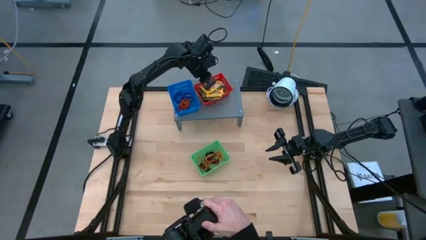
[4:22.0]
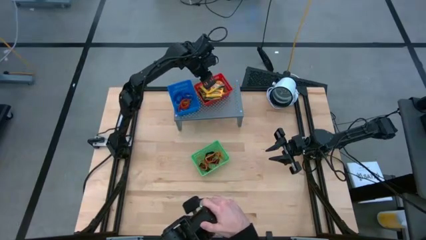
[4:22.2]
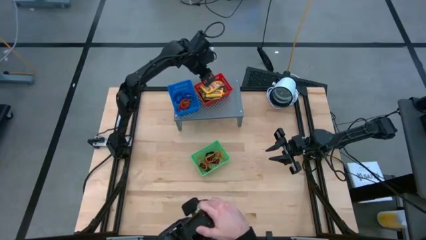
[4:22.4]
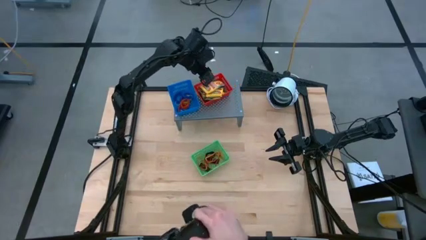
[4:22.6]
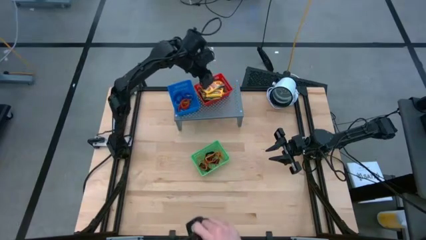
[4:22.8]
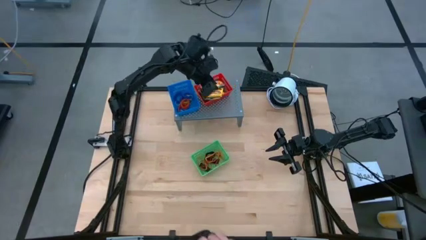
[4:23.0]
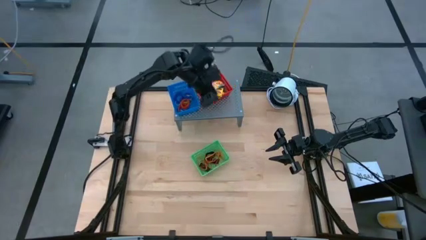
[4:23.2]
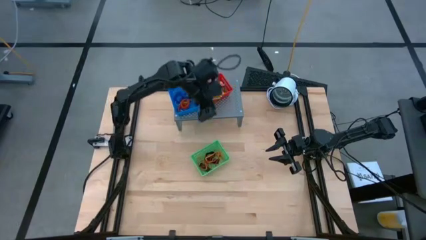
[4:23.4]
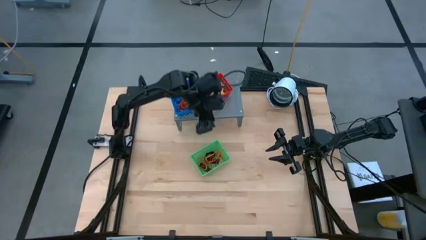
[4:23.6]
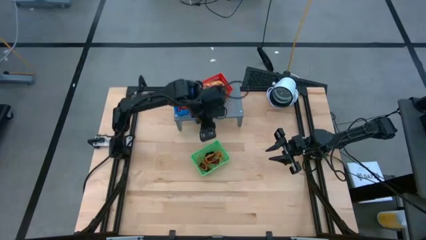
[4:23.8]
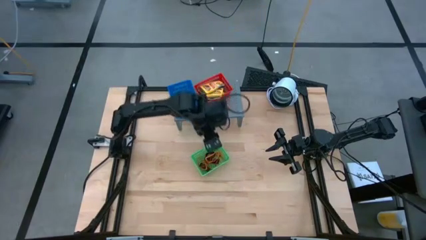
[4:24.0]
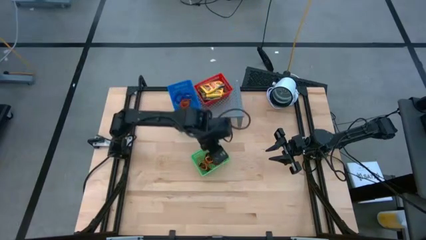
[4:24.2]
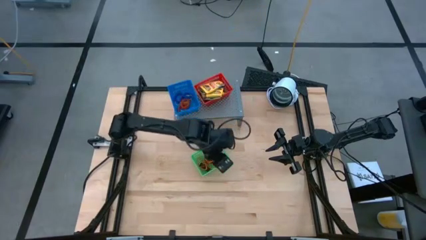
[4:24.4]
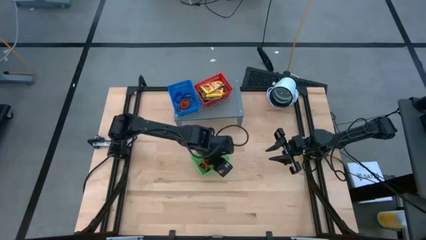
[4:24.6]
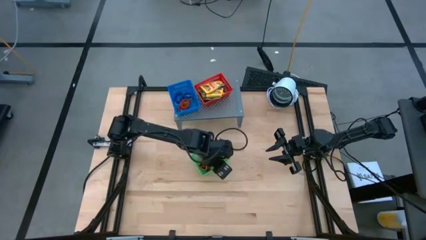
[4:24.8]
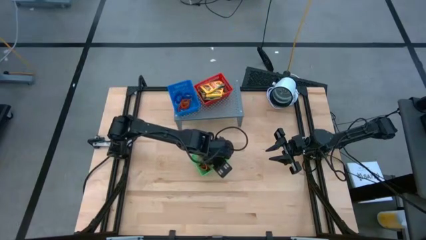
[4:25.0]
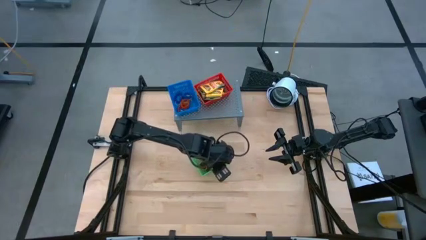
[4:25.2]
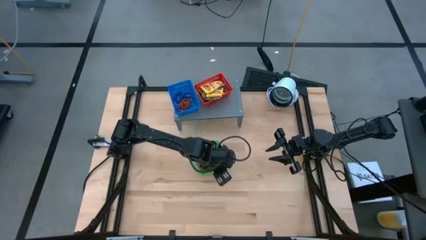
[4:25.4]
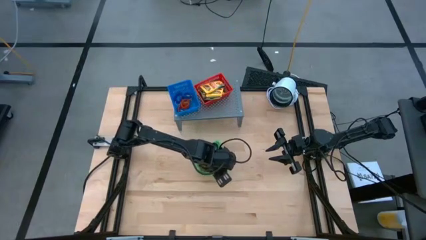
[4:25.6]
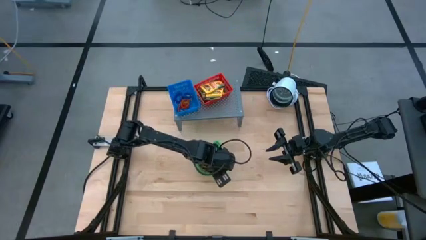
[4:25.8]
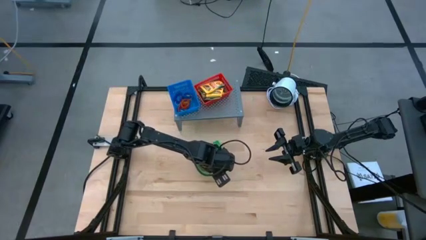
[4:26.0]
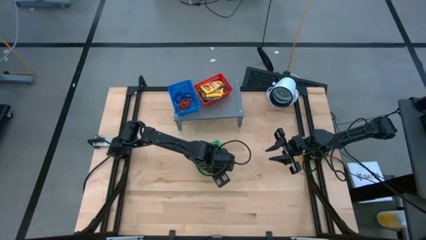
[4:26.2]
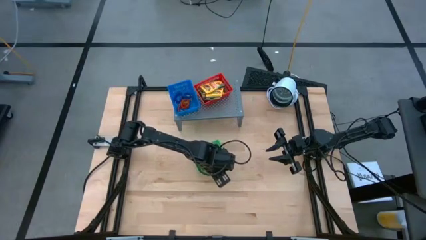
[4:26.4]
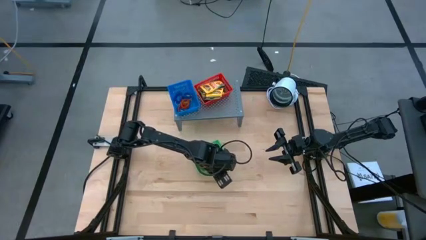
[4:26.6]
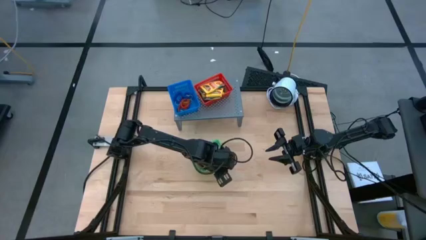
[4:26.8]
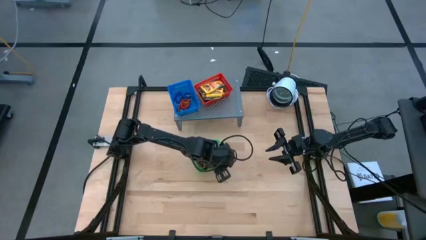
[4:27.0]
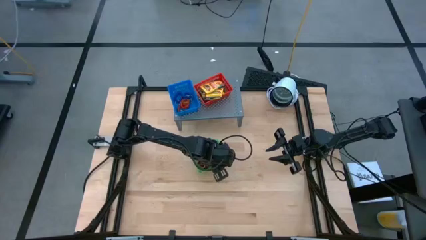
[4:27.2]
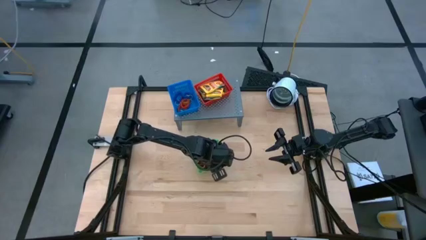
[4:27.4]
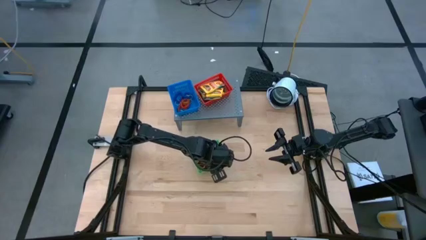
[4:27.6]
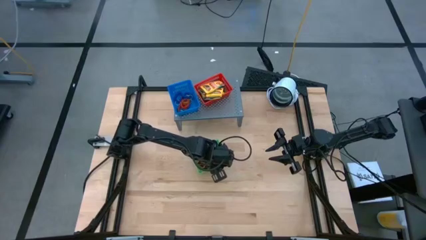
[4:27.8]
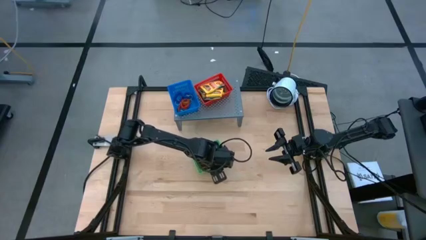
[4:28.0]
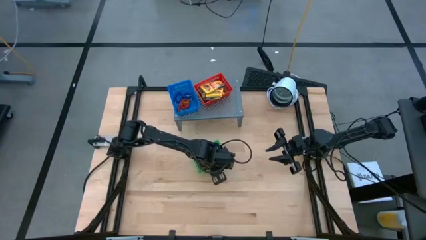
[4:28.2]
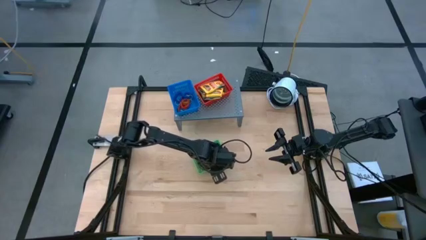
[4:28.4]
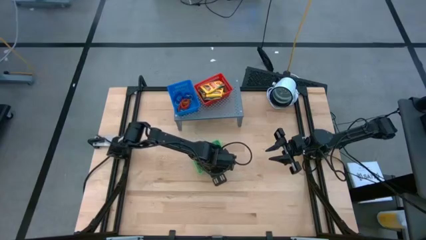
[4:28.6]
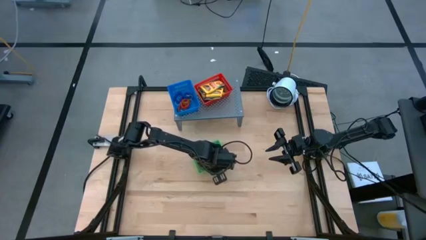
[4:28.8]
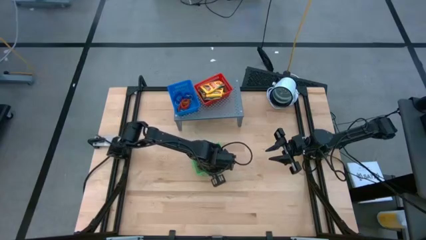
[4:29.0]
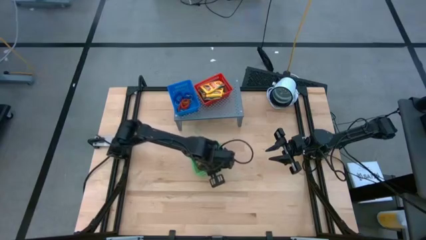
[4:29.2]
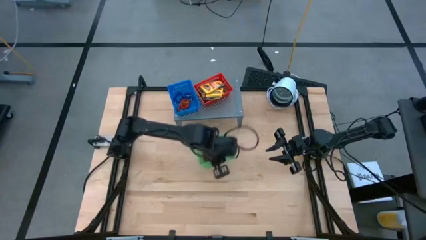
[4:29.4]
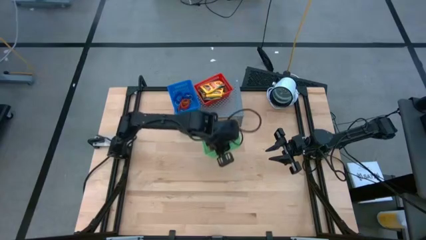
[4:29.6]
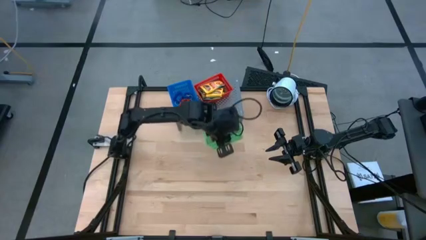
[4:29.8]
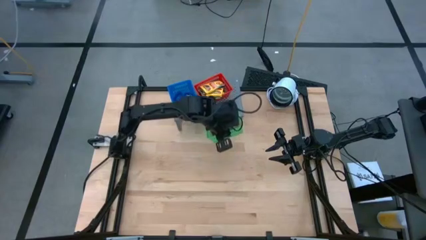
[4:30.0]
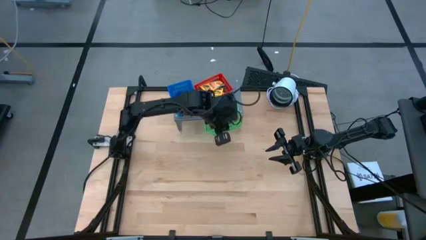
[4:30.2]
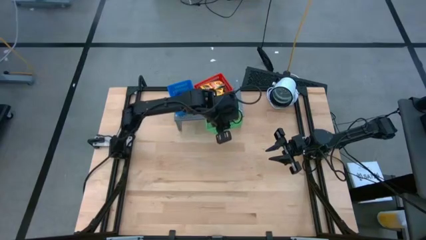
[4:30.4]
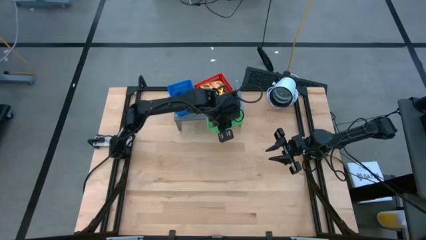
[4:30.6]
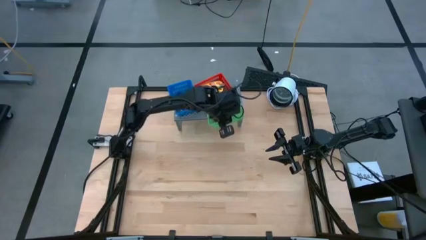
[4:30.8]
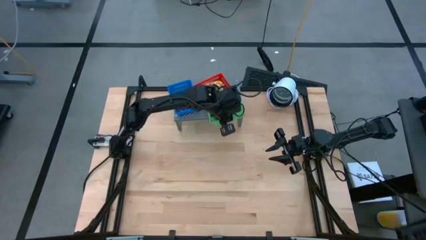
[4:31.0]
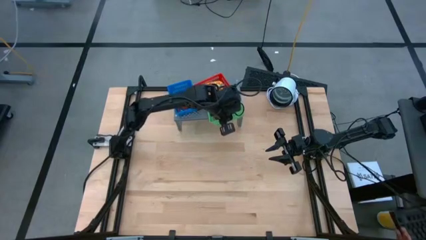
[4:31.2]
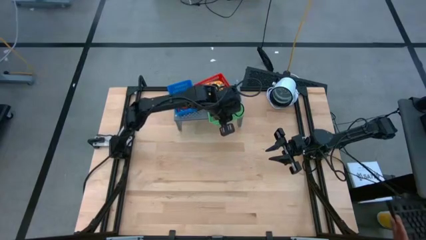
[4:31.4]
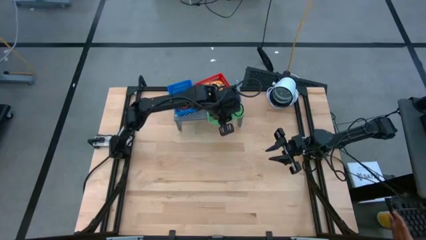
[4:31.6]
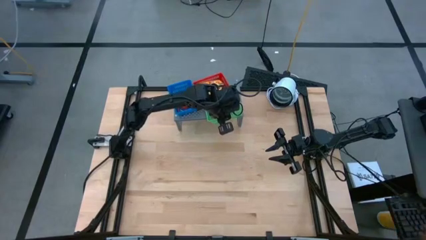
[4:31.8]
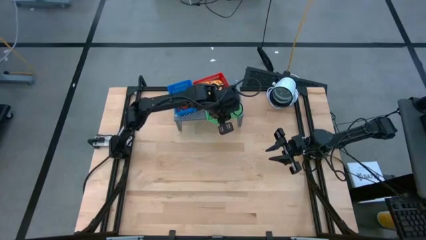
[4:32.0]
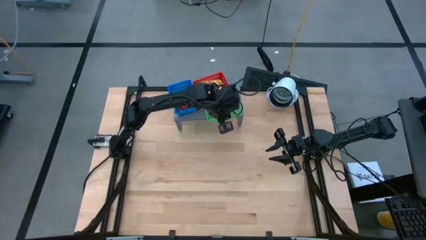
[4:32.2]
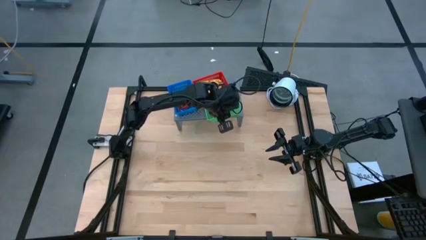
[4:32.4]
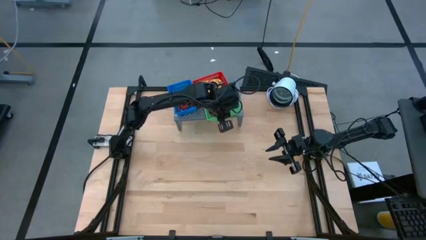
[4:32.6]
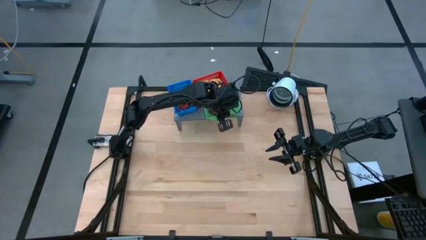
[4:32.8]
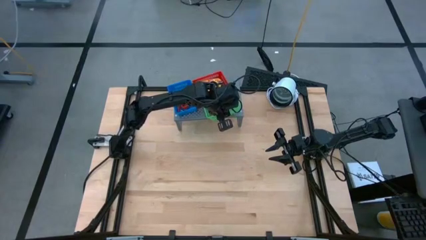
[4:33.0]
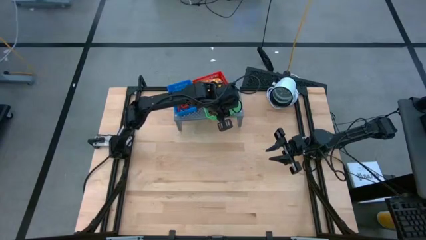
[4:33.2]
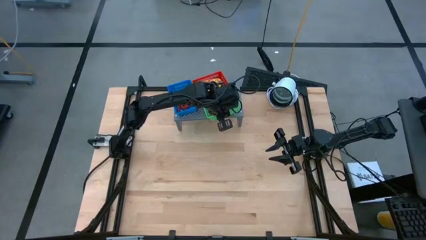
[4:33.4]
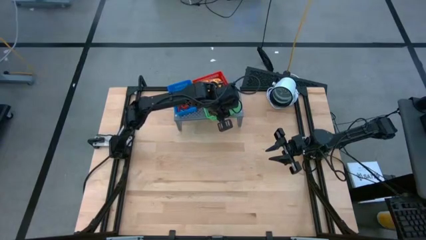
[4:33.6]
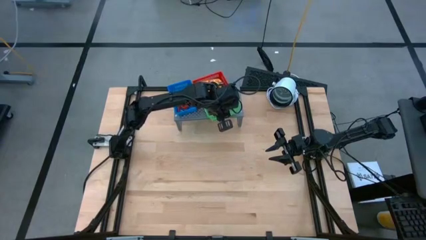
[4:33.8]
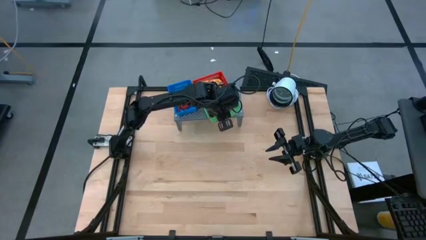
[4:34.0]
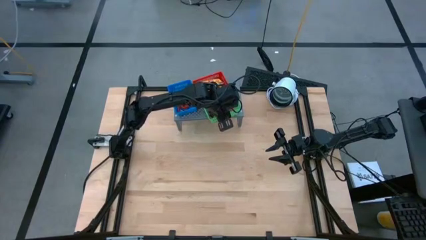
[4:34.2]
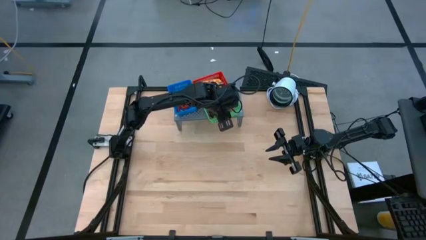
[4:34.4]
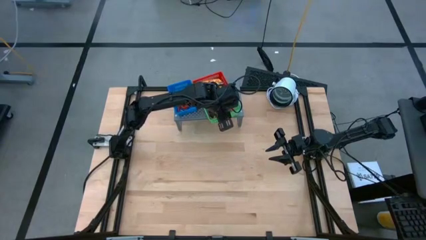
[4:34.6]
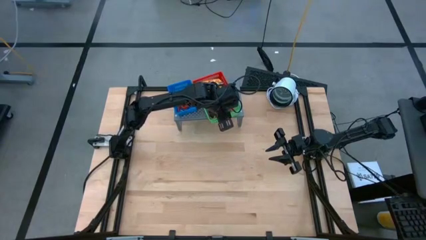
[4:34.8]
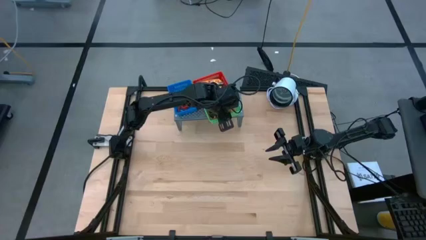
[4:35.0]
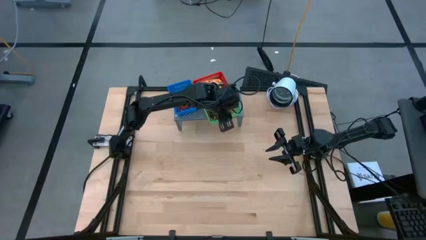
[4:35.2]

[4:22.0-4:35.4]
Task: Pick & Place Office Desk Supplies
Put the green basket on the shelf
